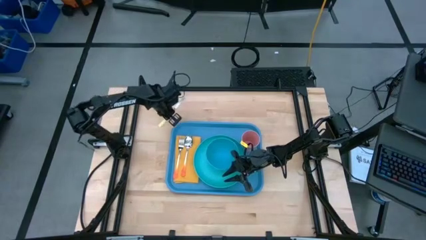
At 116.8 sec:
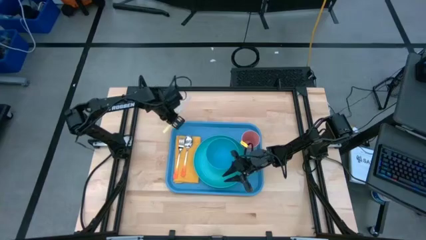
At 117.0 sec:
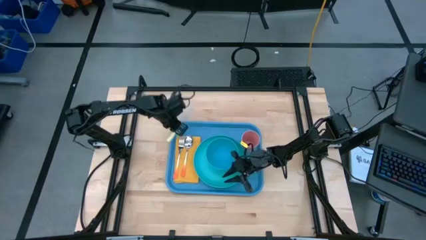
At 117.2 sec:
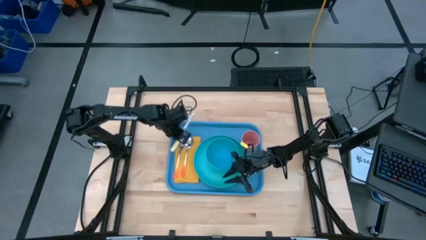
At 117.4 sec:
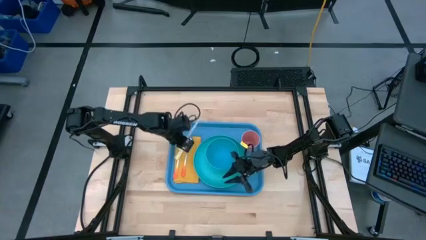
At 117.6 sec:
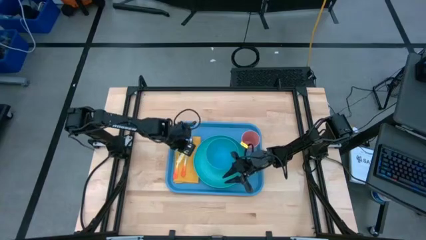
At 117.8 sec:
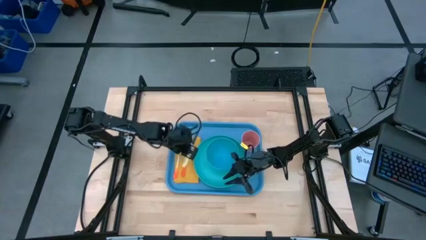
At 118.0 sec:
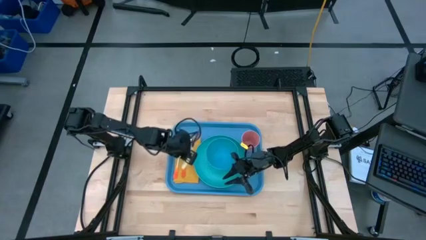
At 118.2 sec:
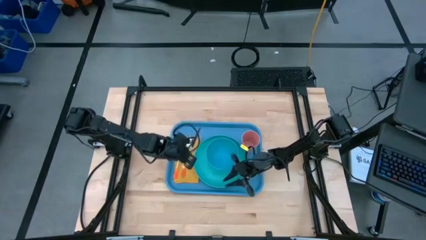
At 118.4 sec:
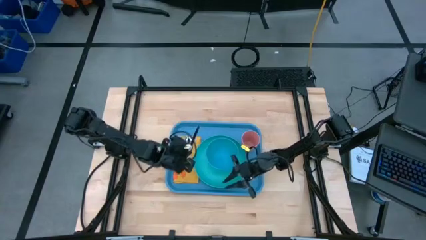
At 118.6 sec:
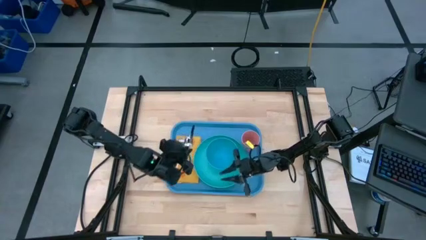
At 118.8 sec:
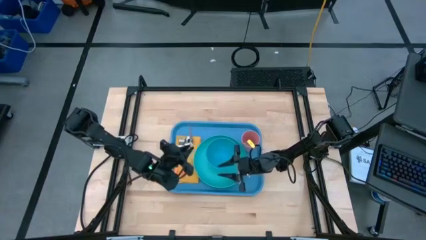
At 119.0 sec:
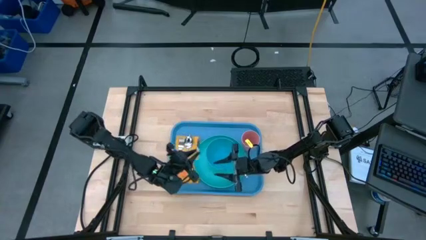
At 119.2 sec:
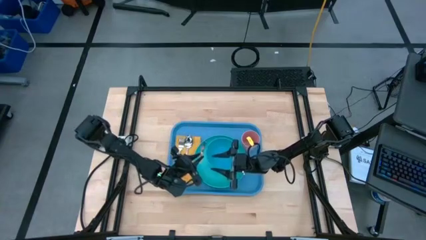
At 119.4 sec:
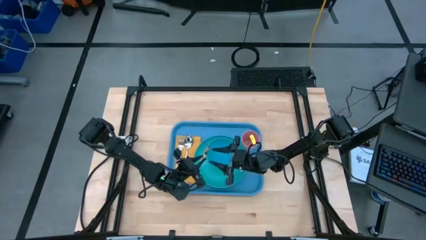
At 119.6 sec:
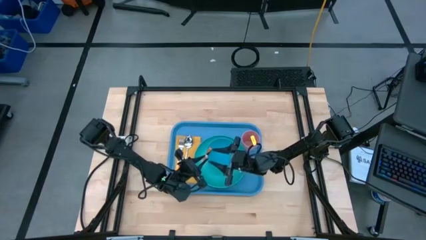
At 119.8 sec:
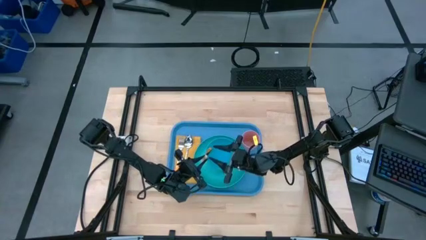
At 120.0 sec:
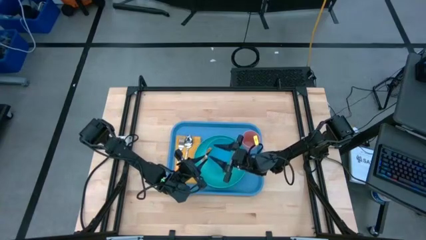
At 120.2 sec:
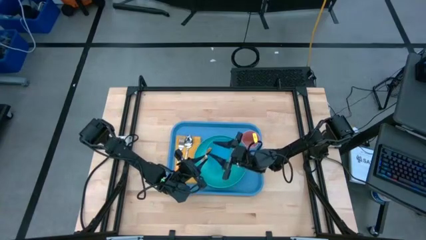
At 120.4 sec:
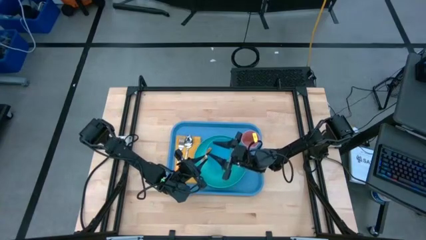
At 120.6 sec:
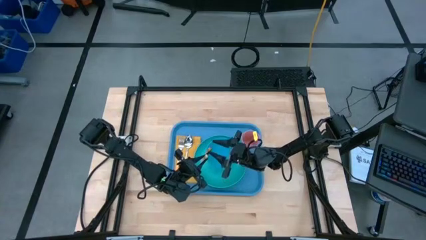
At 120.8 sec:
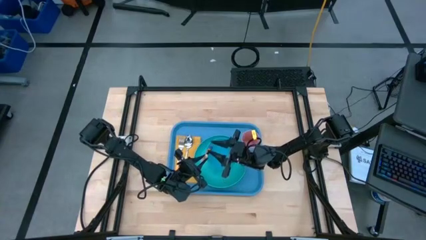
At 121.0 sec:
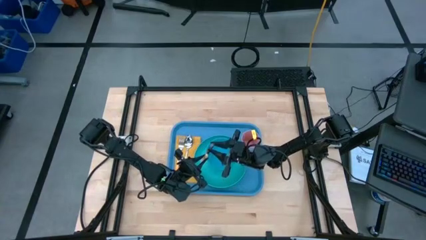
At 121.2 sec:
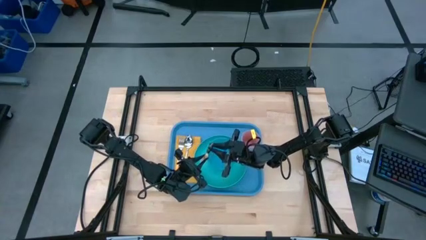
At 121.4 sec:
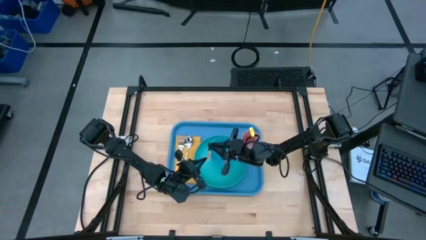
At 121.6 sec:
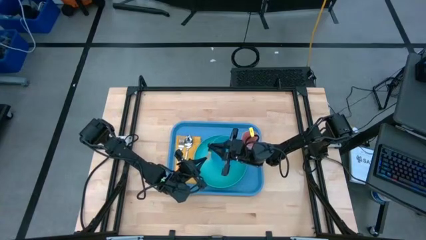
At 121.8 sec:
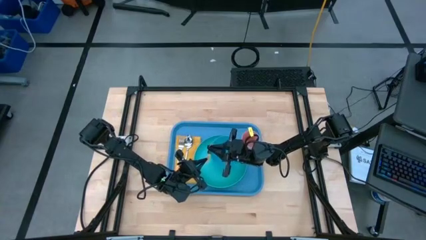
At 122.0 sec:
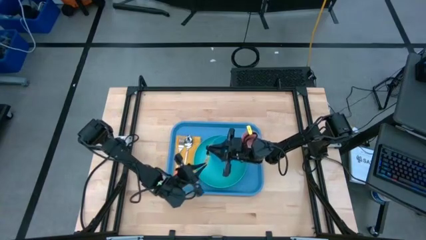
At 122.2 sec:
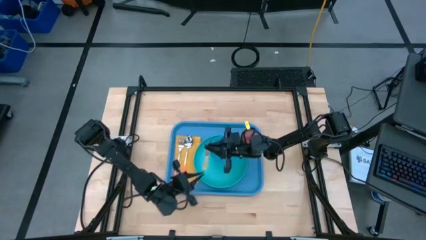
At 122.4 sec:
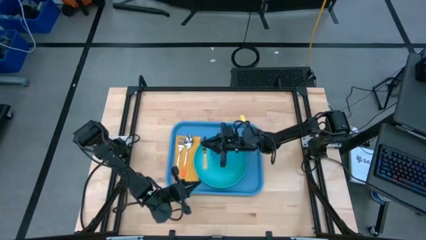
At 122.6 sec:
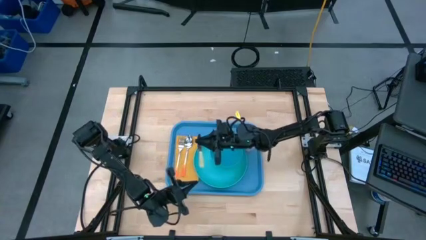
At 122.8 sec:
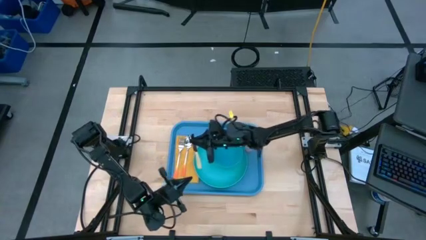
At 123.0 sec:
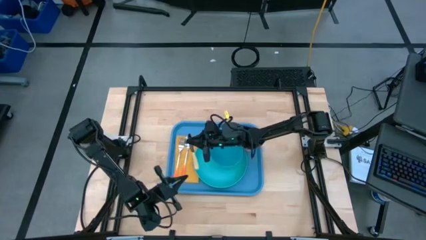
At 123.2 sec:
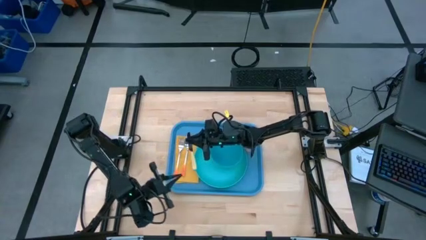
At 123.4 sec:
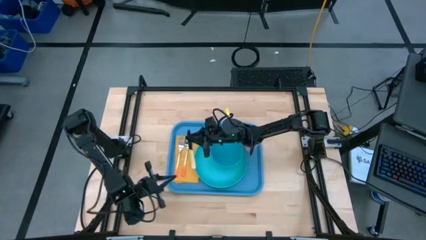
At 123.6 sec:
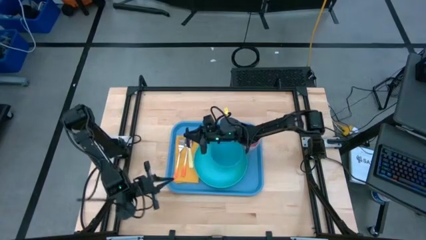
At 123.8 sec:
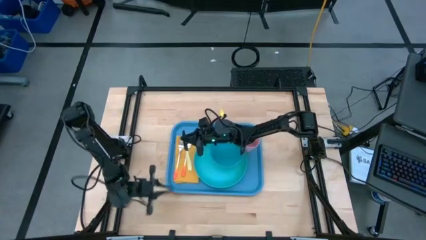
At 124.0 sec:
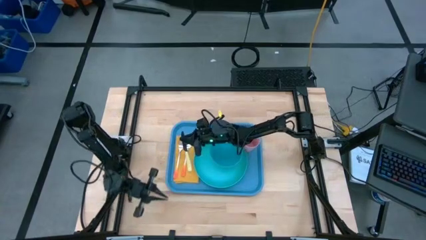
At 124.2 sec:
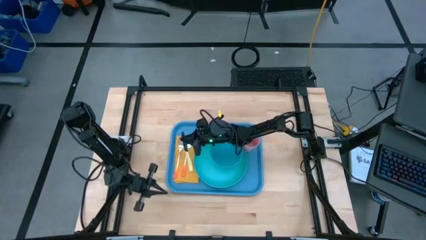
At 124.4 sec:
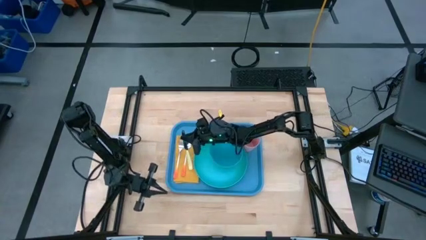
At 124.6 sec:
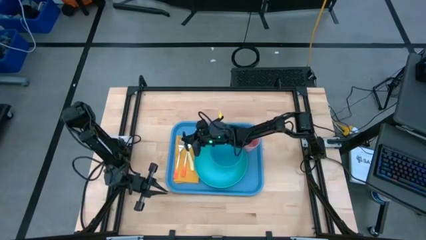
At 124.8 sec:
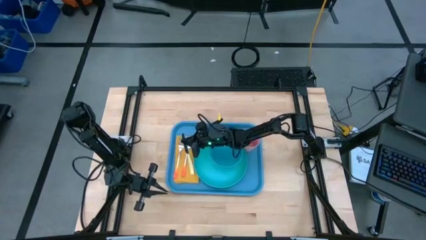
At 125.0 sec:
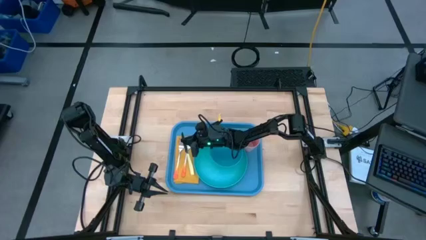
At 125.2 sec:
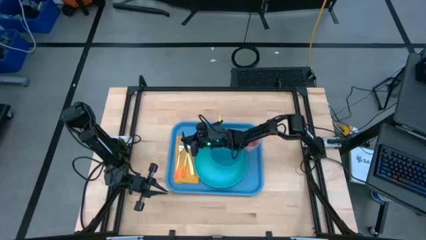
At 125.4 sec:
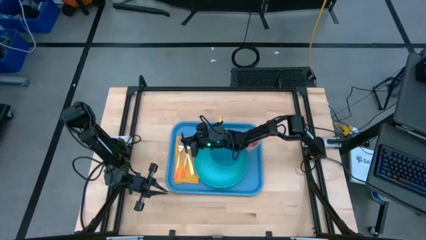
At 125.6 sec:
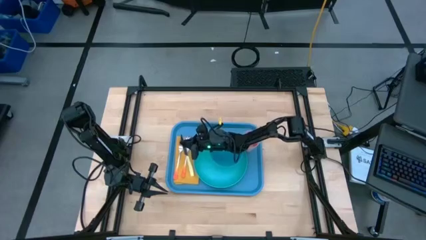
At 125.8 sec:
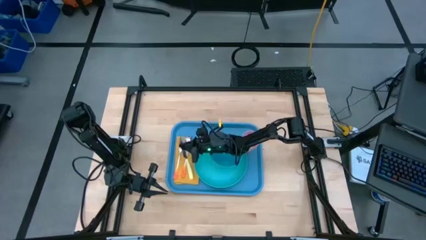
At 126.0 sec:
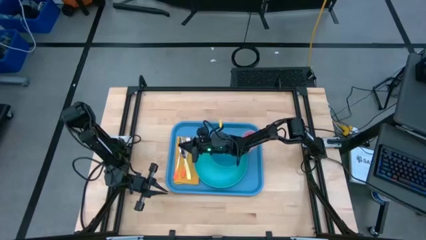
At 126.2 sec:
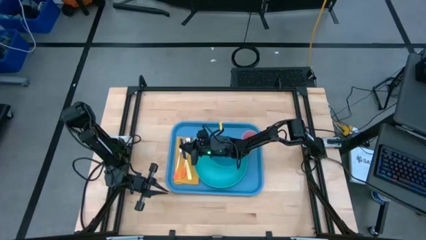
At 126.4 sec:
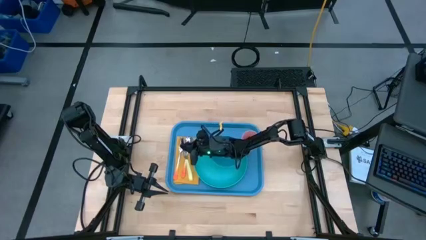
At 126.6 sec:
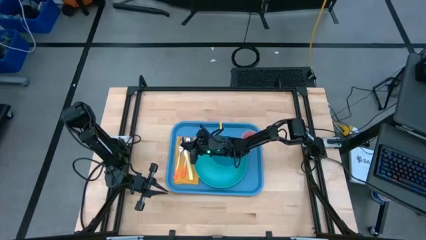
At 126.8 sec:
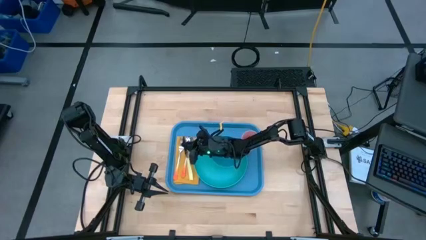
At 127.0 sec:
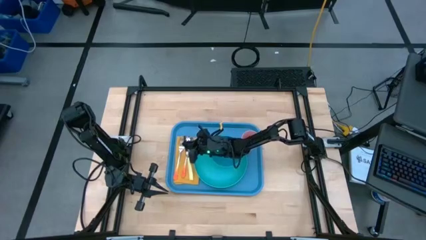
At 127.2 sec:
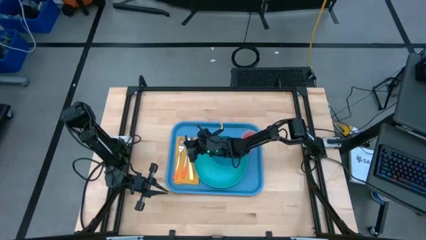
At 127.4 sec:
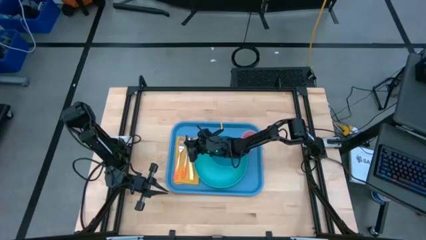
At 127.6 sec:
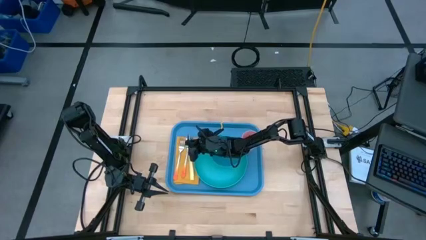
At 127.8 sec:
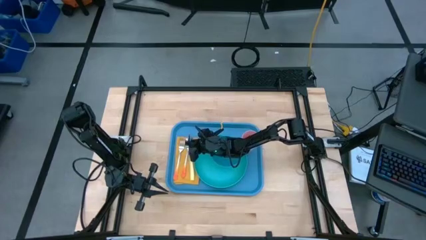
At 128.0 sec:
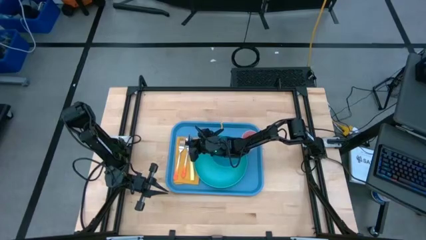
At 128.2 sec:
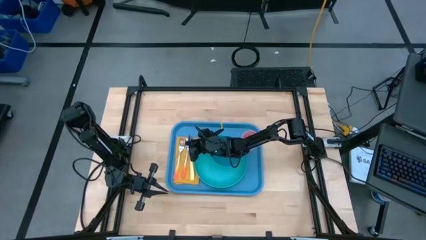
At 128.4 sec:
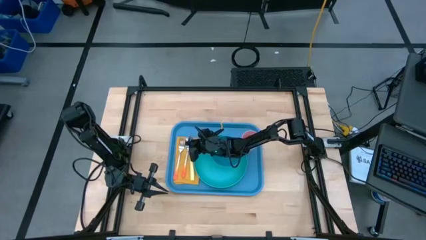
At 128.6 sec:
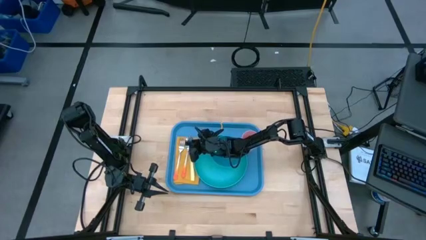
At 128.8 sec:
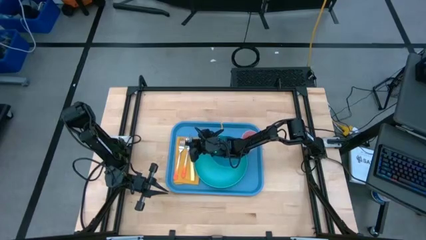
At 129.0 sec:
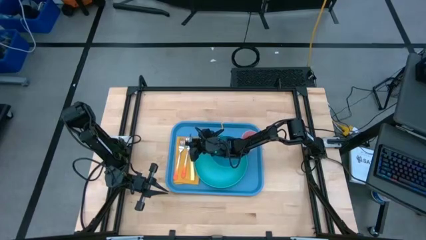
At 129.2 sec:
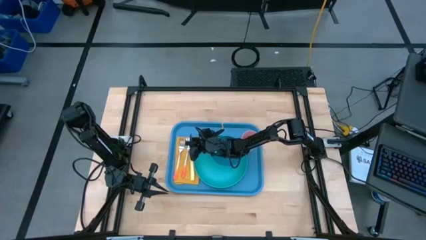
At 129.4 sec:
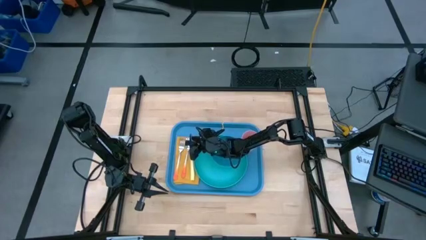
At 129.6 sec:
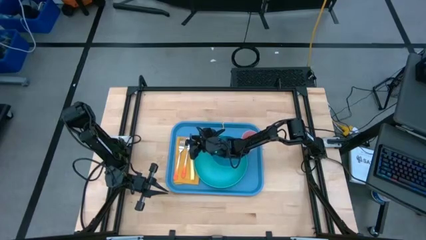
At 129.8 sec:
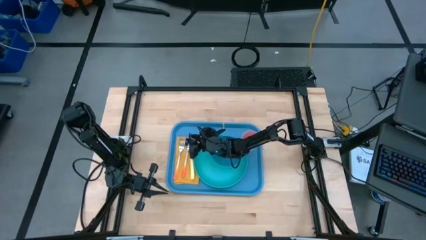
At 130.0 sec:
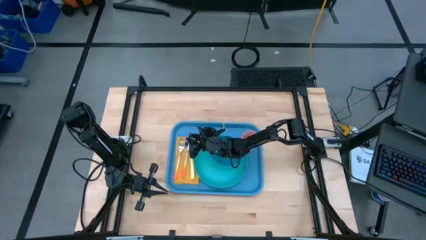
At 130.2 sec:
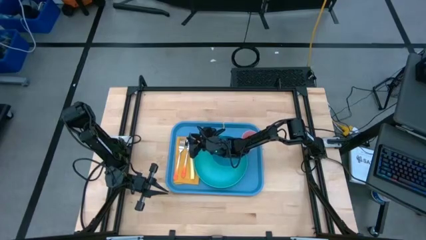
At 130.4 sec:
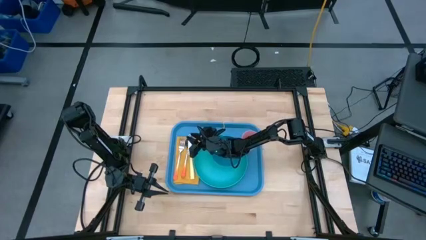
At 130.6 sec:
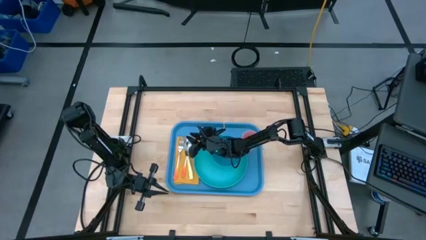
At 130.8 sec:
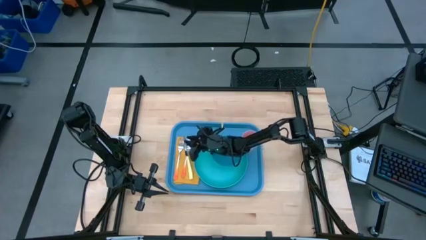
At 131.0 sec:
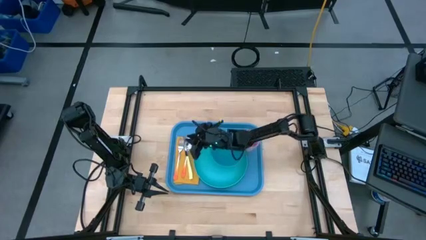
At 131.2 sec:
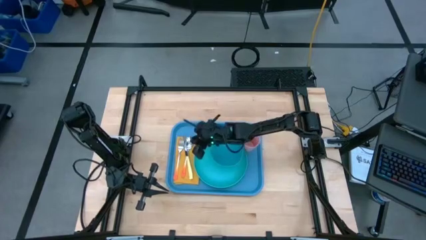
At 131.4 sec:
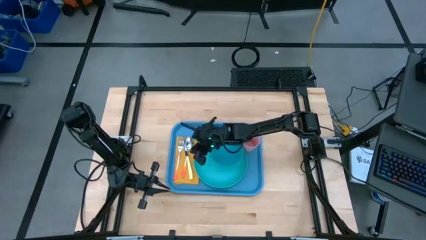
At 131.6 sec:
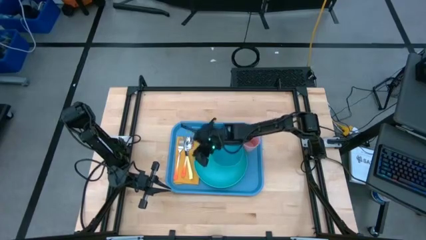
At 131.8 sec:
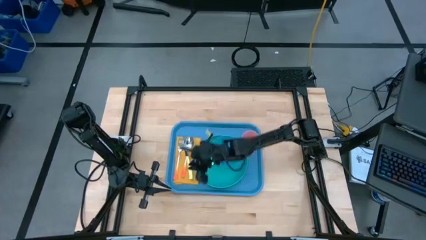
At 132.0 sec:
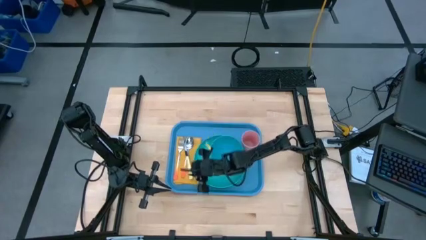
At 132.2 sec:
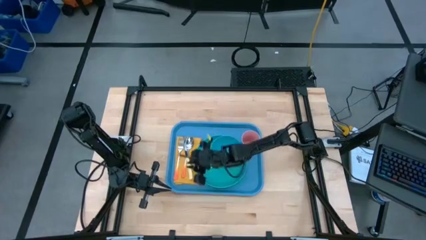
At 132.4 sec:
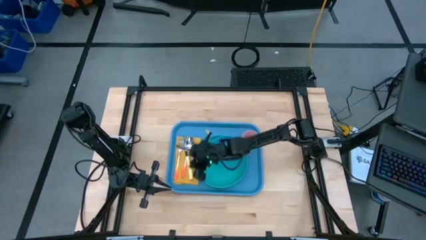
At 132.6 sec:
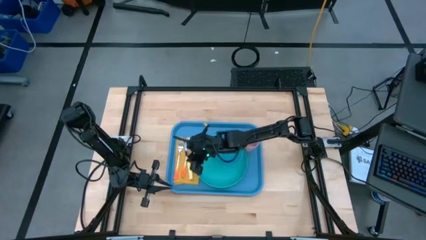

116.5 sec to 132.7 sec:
Task: Set up tray
Put the knife on the yellow napkin

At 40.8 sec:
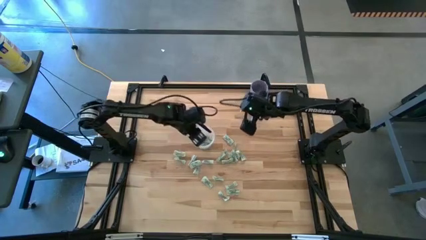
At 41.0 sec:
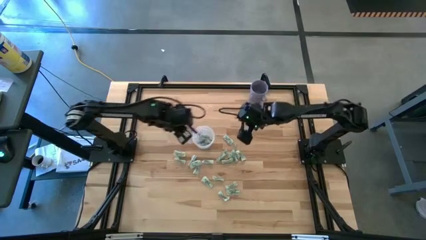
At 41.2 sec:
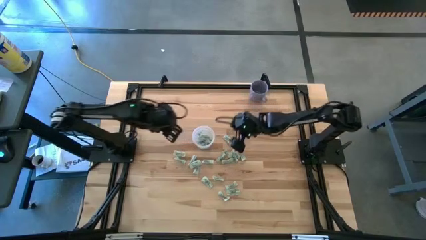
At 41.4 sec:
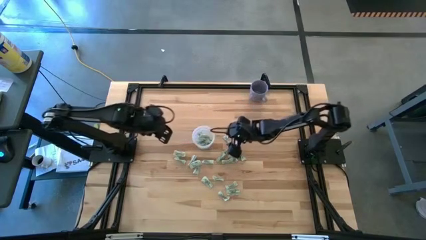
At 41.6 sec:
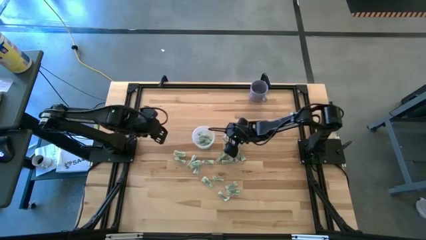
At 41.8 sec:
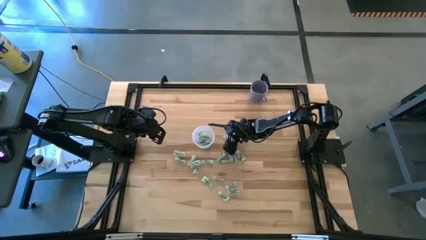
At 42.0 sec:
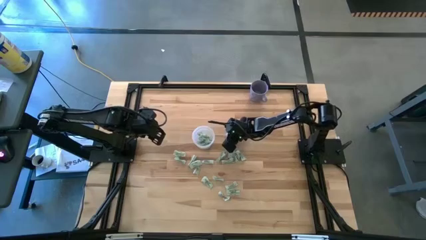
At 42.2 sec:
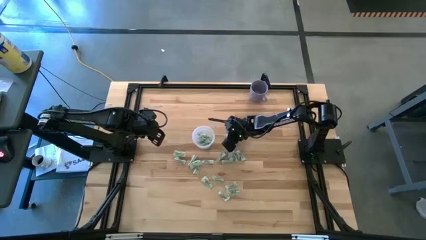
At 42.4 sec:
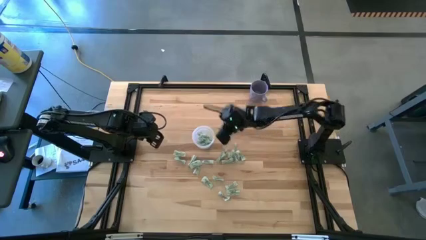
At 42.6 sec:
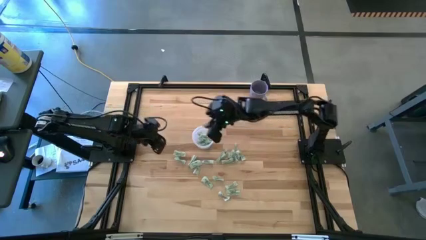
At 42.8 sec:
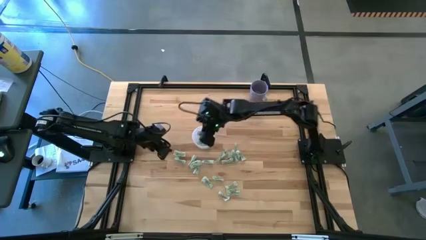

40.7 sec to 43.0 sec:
Task: Pick and place Stevia / Truvia into bins
Put the white stevia packet into the transparent container
